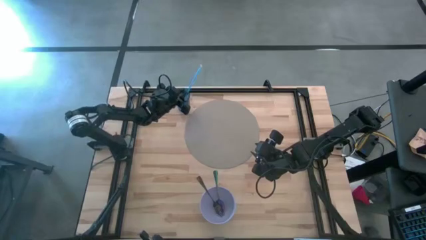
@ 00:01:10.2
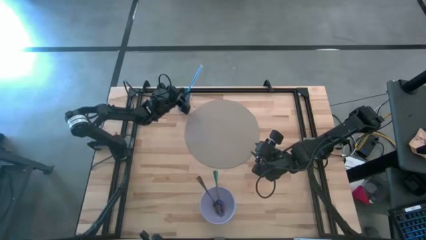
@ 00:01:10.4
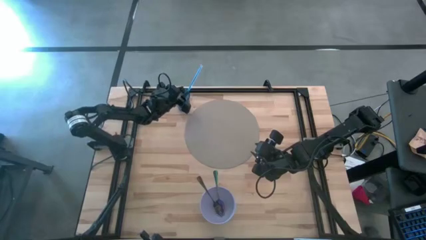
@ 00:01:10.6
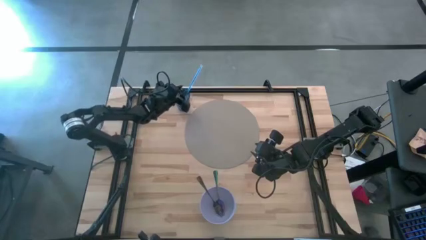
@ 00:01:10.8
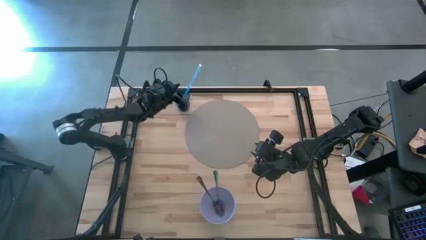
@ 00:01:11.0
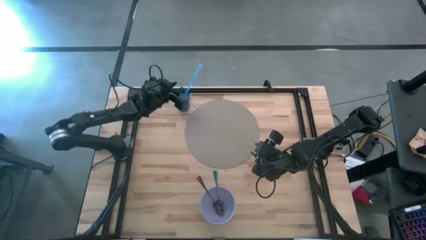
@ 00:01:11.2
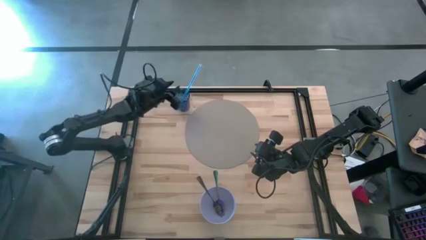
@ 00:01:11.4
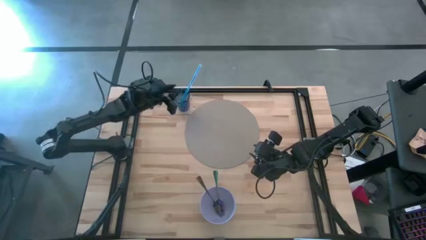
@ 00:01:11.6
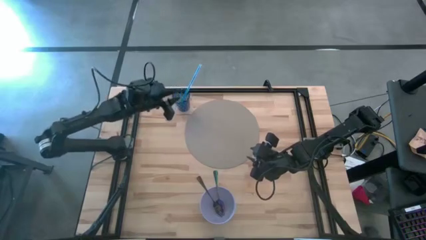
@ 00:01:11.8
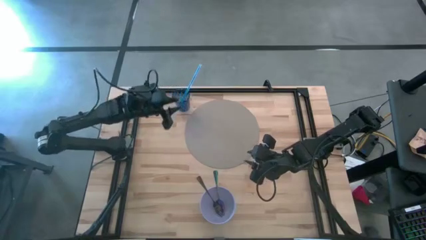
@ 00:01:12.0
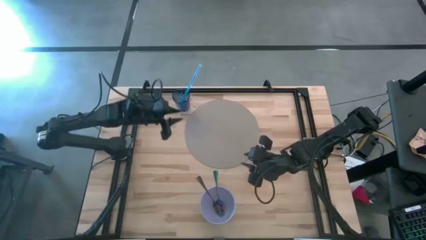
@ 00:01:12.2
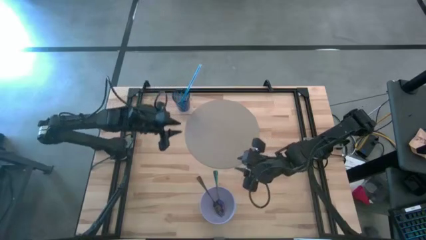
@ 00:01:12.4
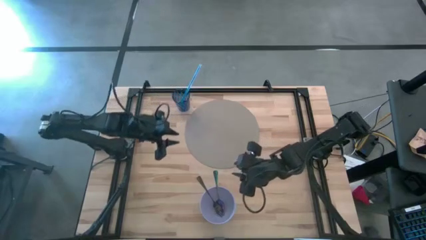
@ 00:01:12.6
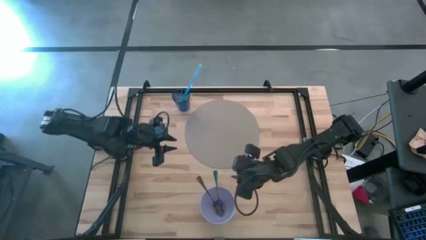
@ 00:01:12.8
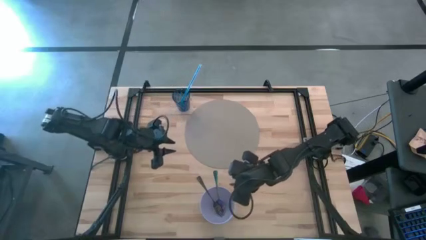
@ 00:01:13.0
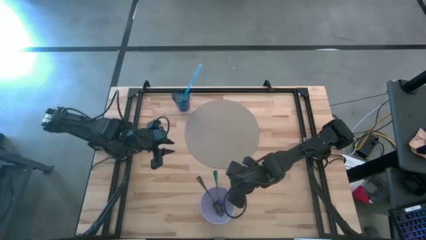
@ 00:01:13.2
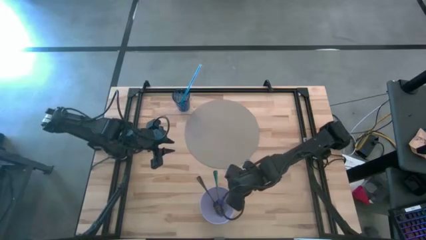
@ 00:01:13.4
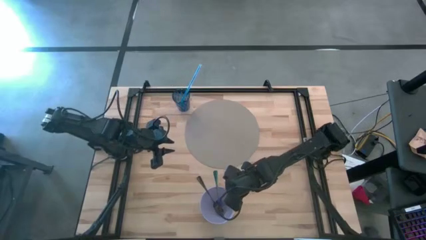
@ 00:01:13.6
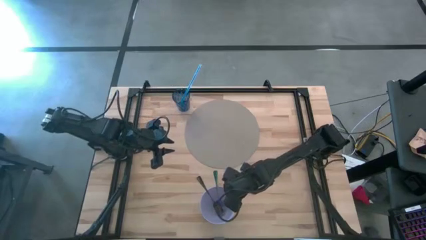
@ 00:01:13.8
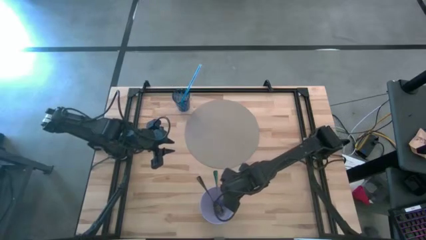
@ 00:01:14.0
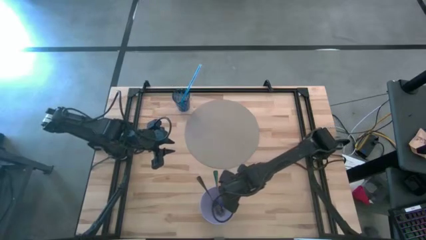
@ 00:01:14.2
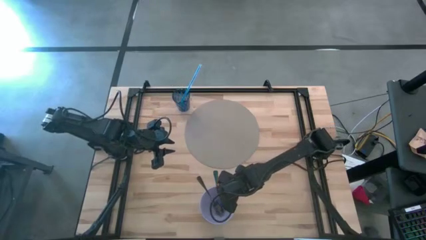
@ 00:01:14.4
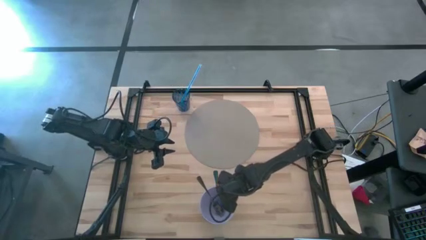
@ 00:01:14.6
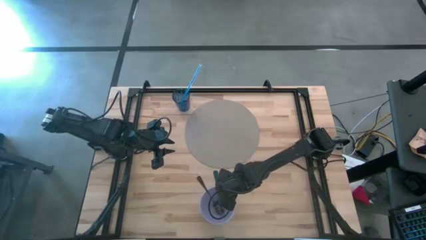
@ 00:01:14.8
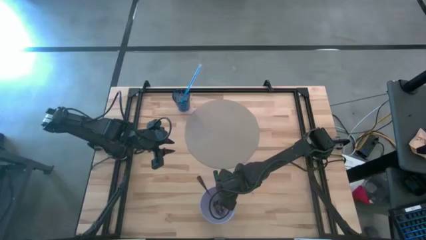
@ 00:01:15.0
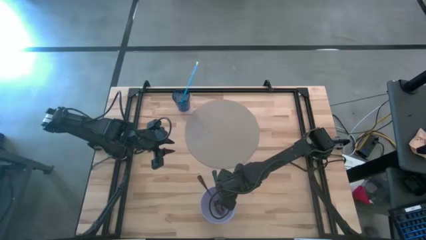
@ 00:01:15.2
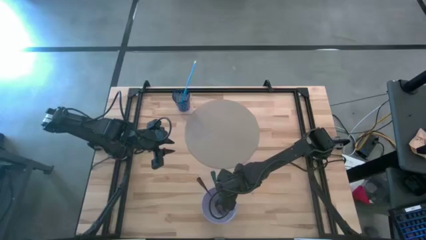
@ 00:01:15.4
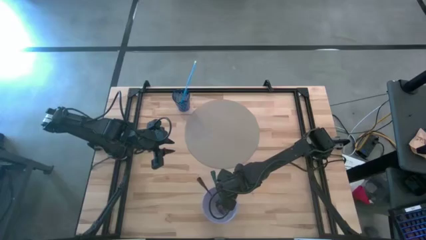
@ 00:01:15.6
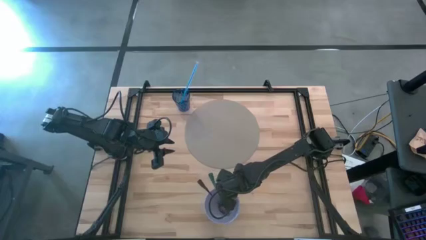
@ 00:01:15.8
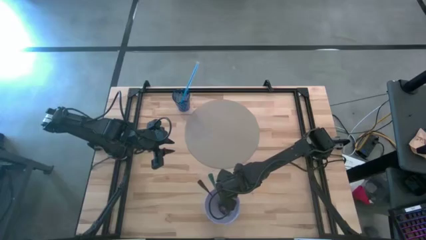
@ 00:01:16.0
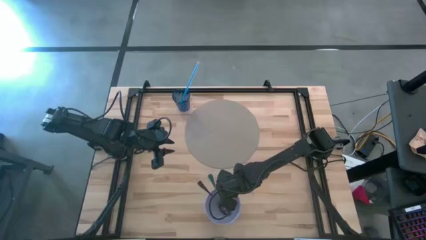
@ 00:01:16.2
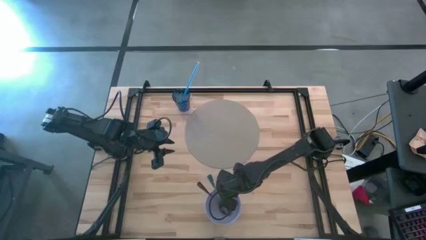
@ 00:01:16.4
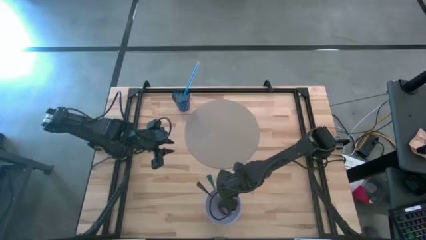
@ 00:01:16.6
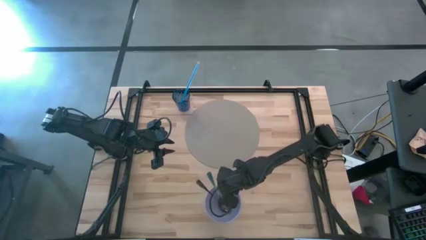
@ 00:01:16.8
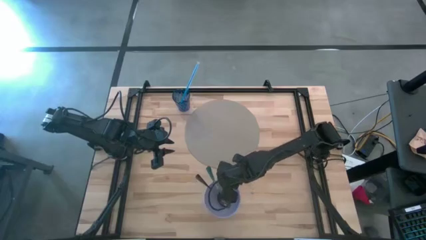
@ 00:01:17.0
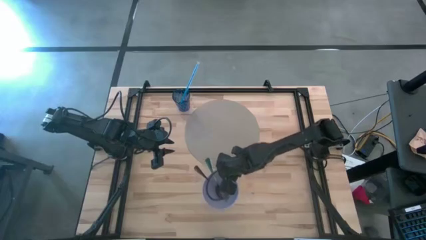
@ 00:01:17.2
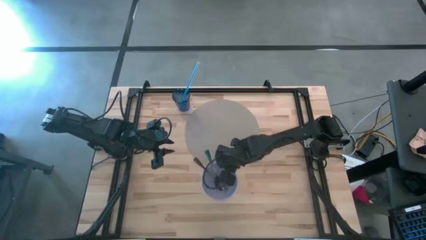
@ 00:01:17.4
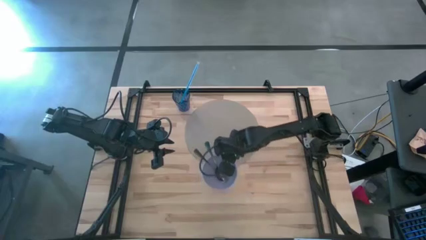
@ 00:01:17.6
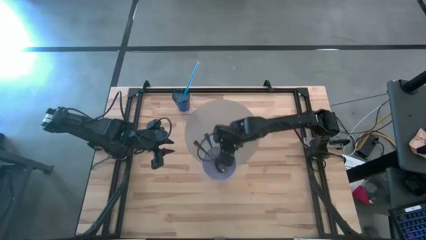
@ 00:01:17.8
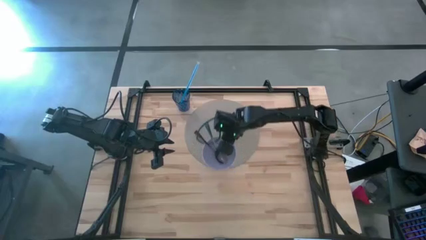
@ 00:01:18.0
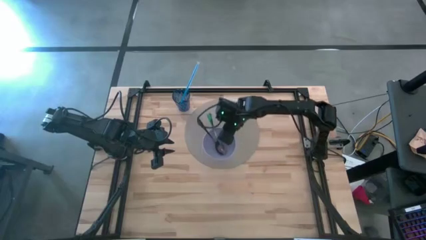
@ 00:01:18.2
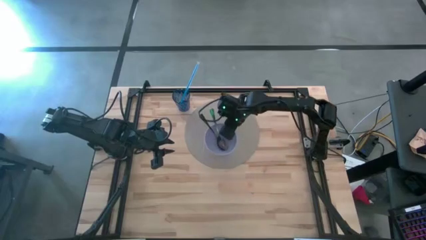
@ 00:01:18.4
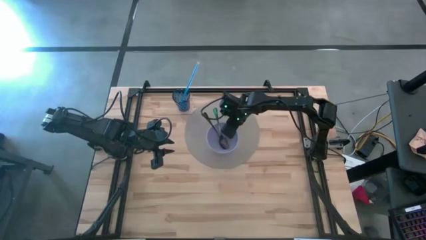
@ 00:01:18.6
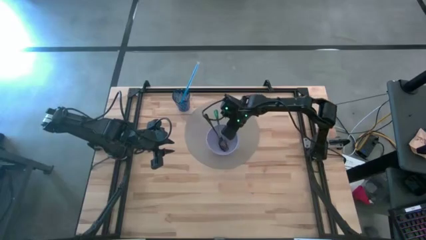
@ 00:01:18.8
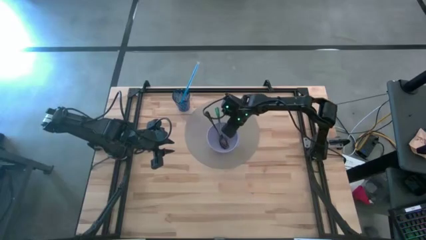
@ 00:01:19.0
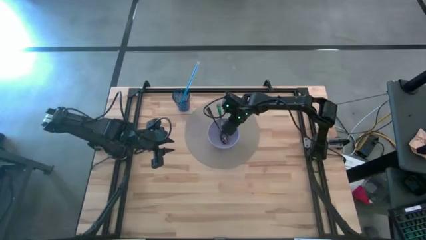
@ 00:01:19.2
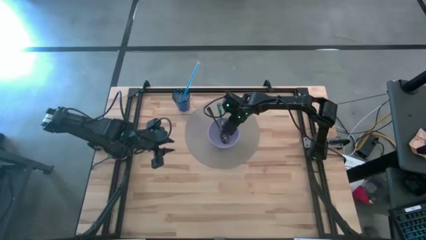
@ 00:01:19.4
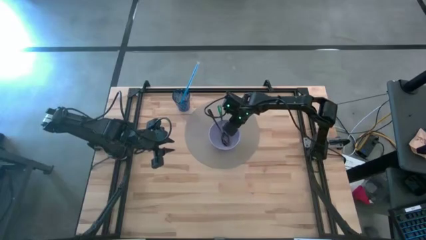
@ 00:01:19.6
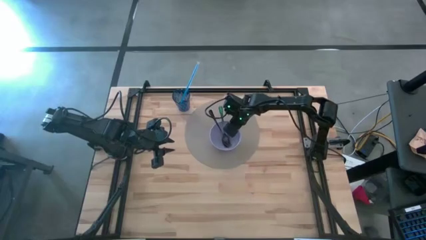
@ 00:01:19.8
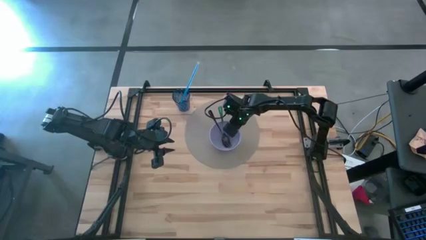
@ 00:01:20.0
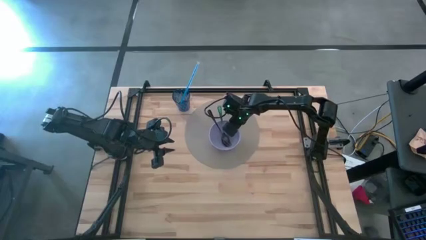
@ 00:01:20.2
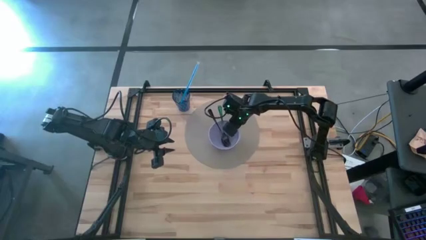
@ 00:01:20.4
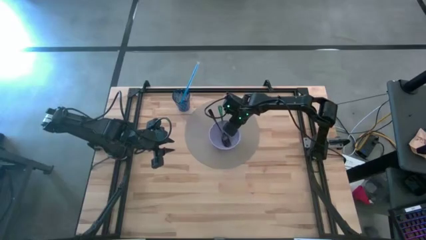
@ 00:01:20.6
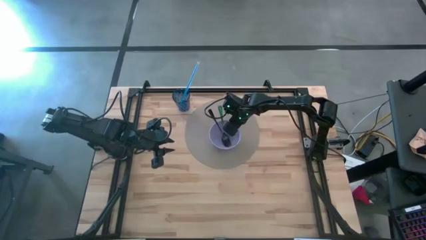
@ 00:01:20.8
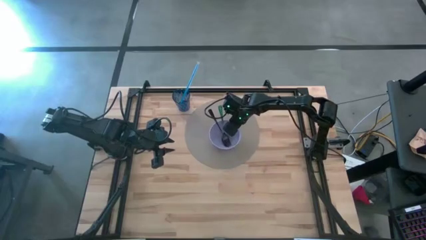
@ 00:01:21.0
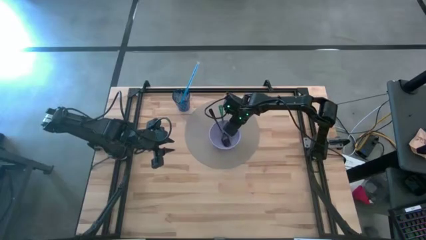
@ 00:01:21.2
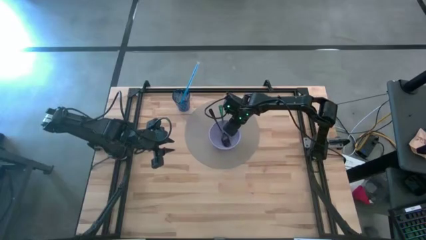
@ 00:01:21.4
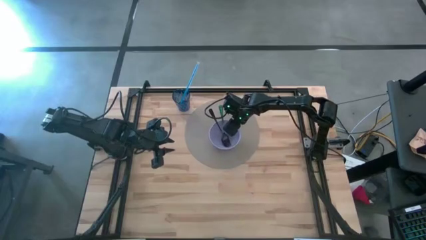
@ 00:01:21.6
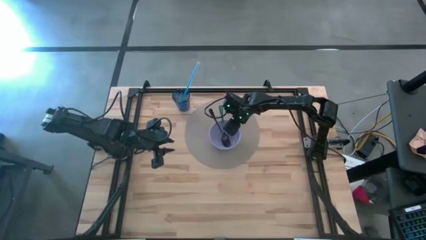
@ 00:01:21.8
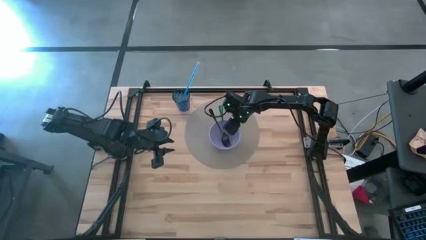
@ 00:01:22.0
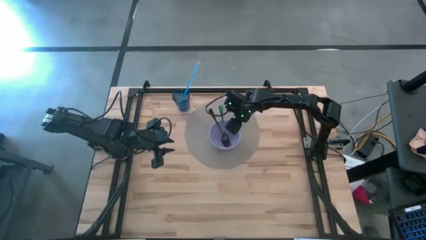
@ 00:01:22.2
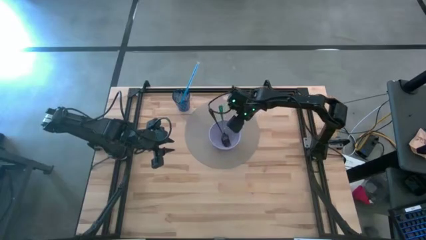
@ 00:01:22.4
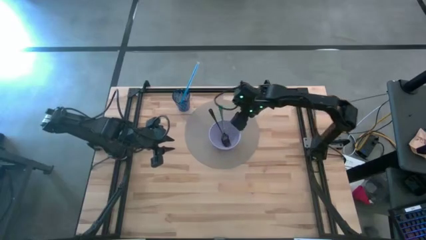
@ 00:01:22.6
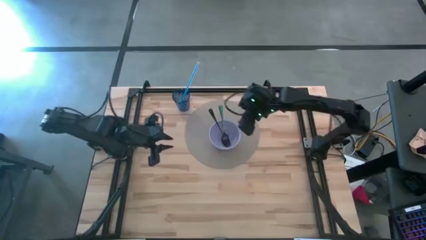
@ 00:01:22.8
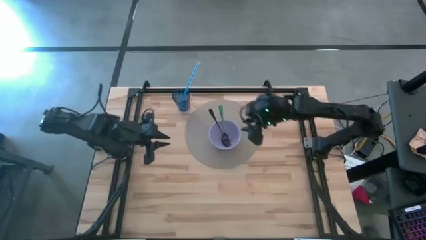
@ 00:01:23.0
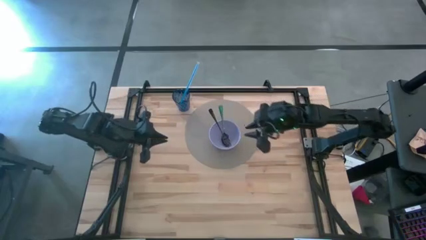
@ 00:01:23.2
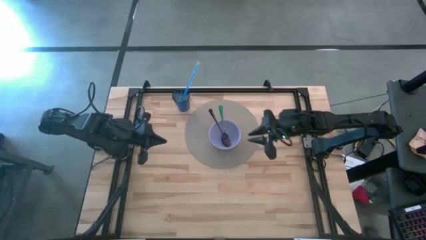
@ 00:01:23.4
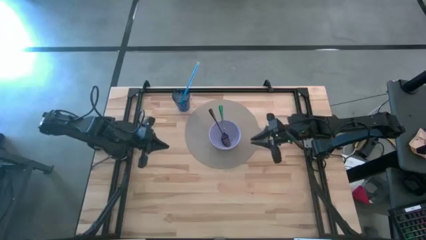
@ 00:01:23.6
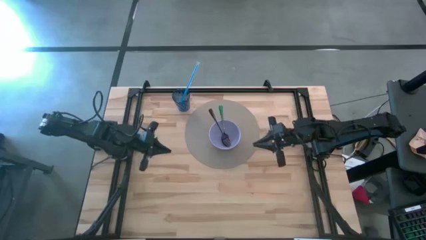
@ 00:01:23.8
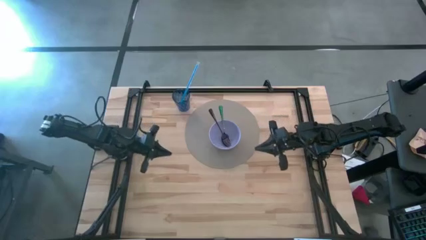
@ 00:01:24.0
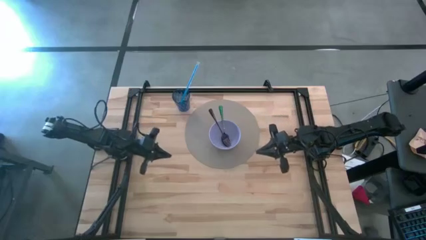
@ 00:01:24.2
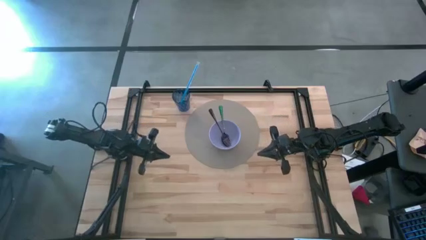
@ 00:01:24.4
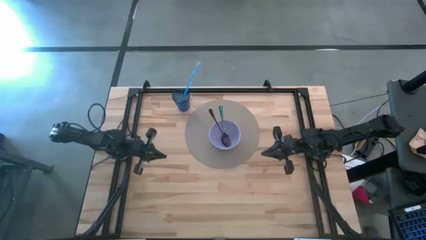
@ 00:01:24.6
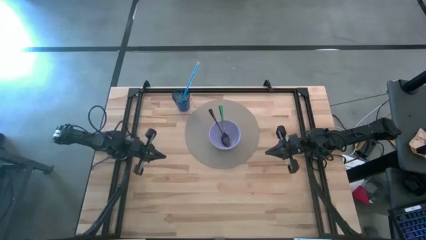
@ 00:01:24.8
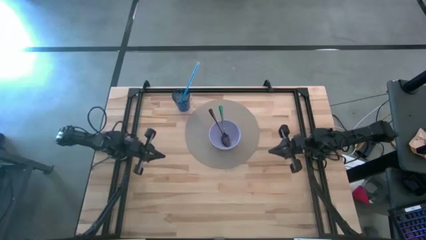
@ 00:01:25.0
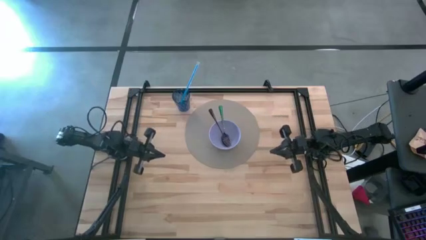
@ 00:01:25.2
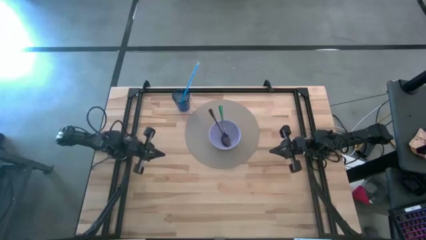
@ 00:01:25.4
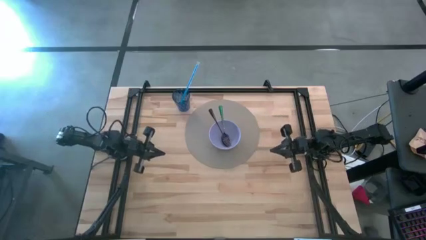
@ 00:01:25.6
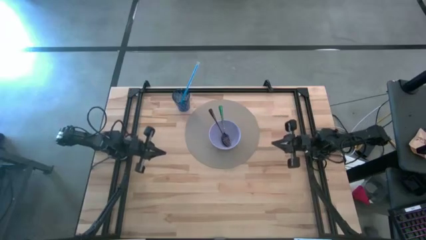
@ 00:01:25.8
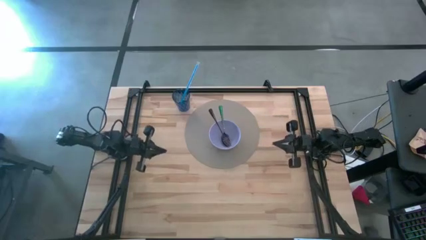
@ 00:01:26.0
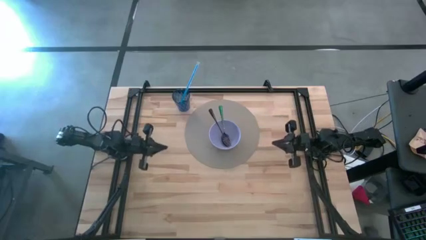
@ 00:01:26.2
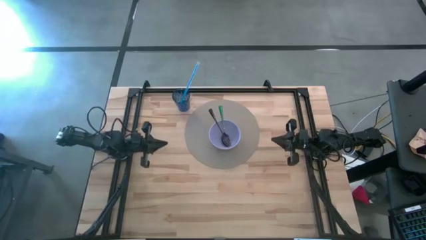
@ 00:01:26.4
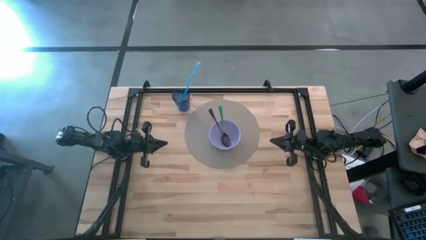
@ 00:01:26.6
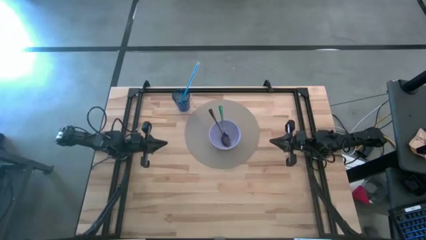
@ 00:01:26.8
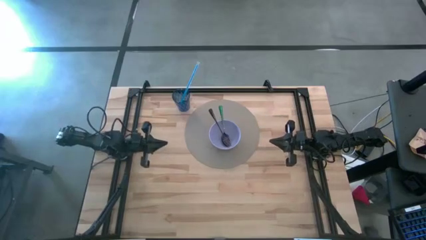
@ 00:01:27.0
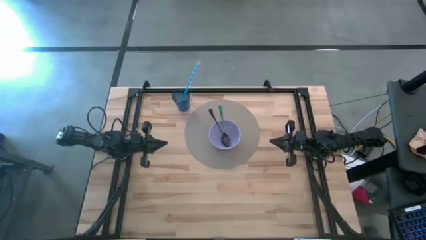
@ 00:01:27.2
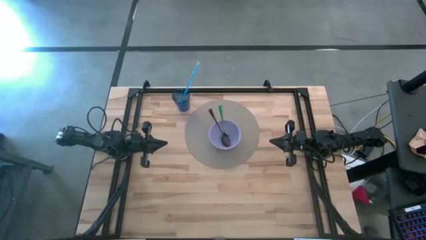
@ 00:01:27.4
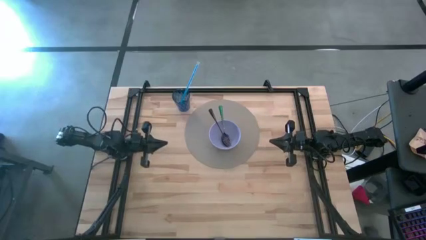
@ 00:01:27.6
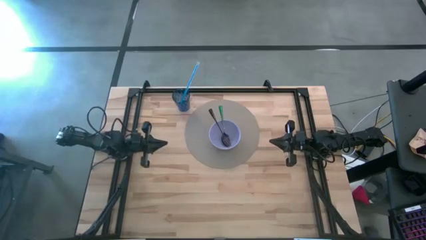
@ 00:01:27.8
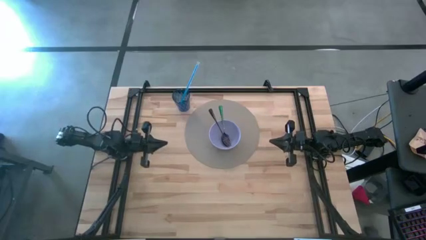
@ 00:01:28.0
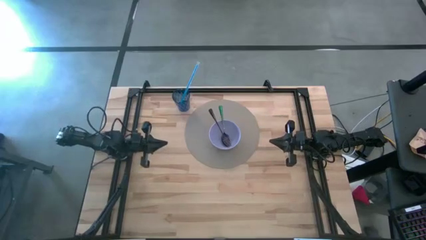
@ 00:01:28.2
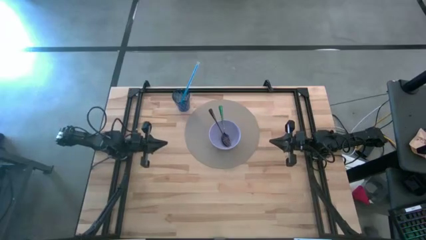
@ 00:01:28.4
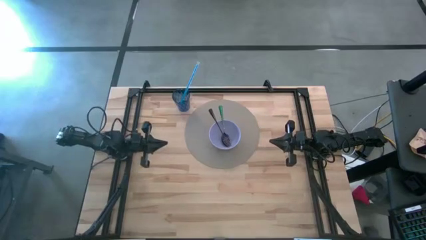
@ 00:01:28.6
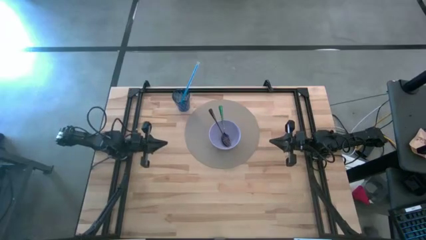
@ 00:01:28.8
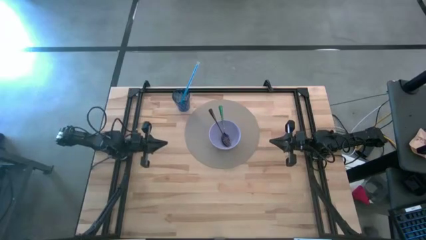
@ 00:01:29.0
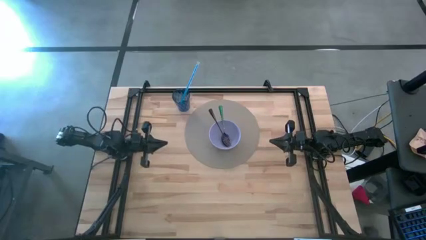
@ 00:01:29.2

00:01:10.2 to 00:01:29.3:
Task: Pick & Place Utensil
Put the purple bowl with the utensils on the brown mat
